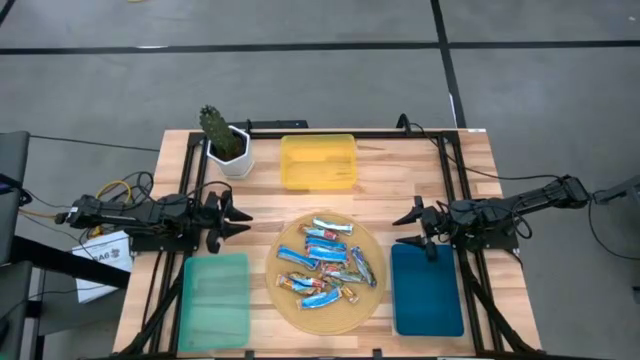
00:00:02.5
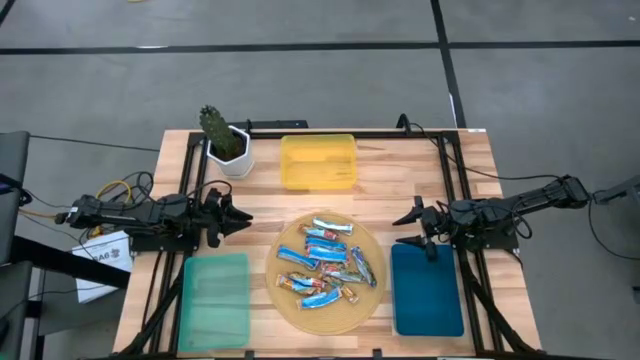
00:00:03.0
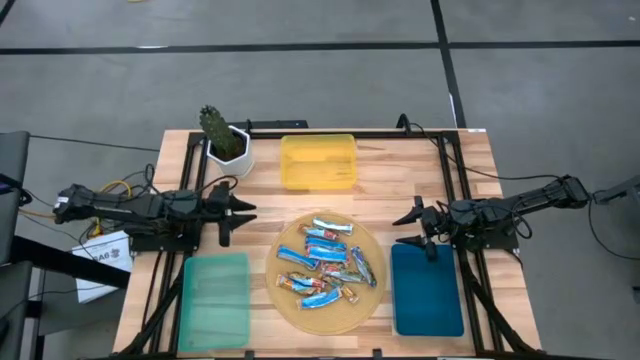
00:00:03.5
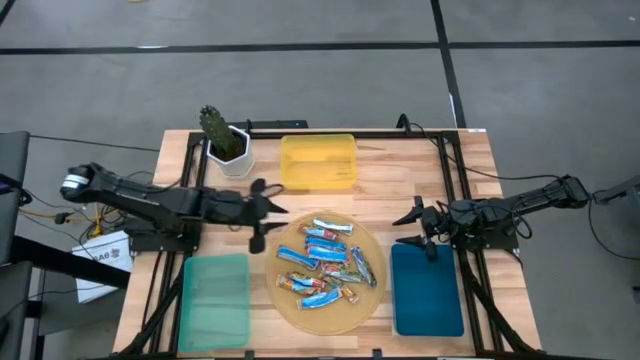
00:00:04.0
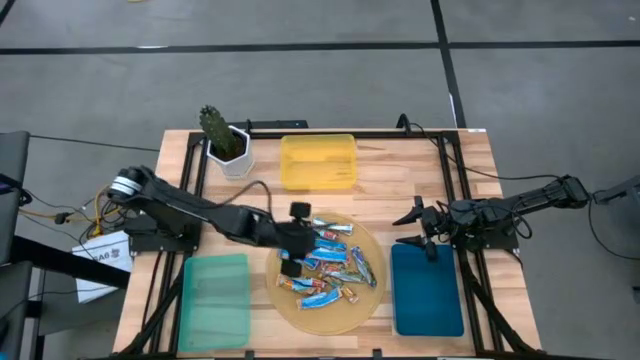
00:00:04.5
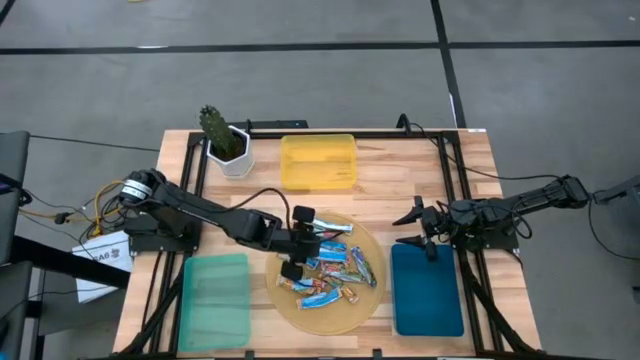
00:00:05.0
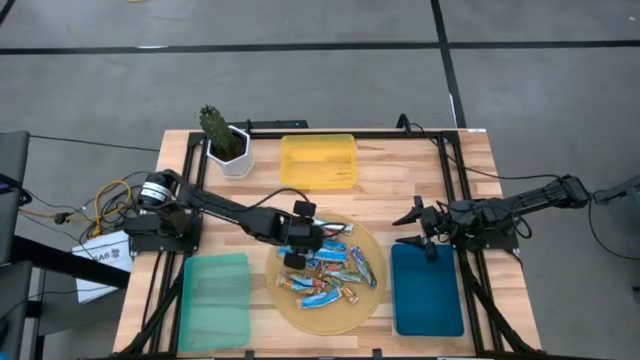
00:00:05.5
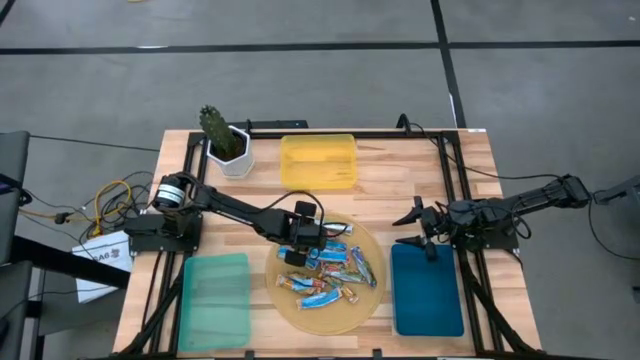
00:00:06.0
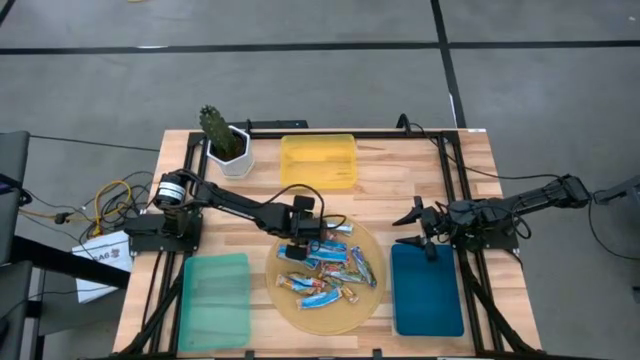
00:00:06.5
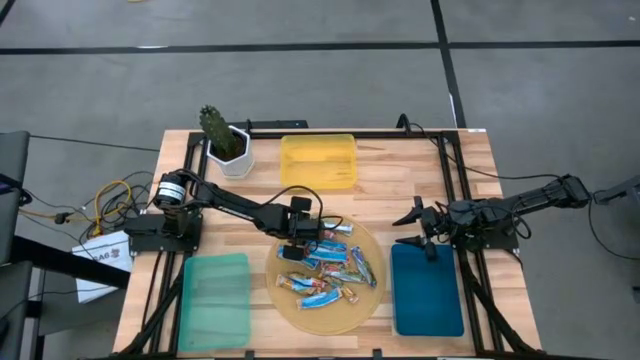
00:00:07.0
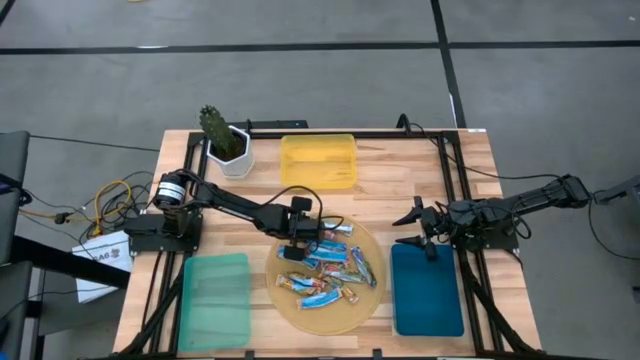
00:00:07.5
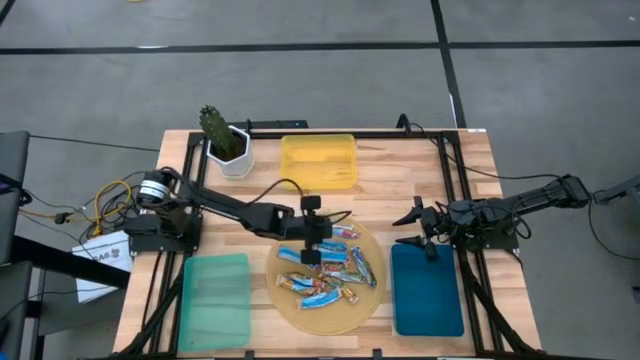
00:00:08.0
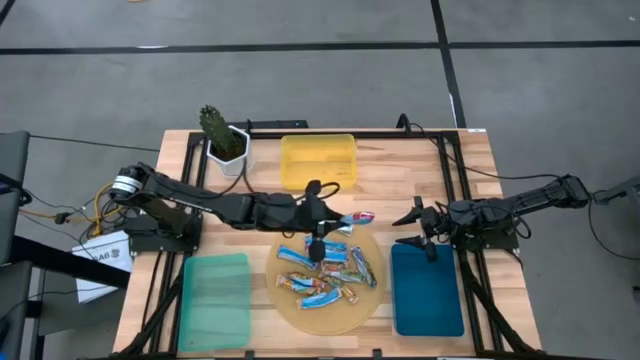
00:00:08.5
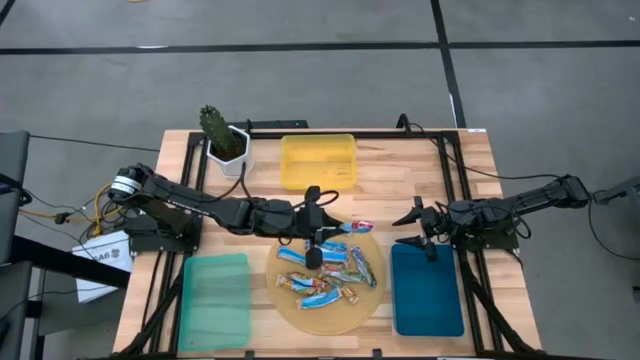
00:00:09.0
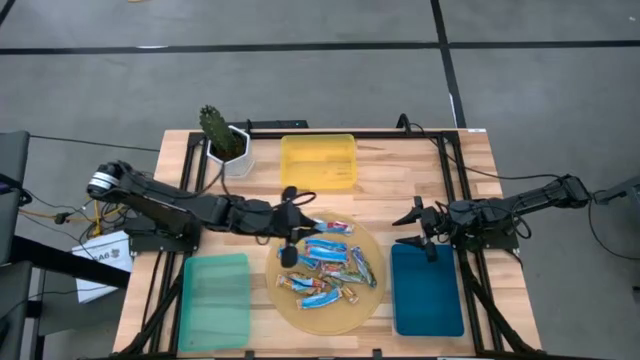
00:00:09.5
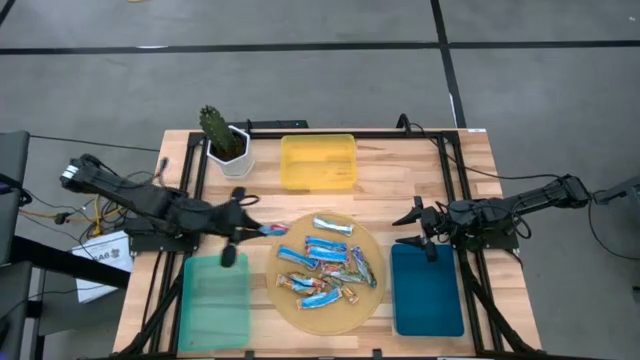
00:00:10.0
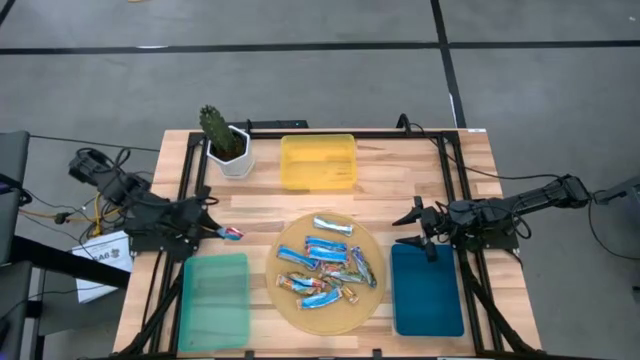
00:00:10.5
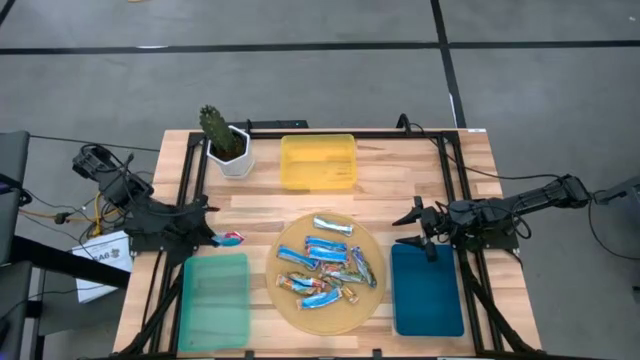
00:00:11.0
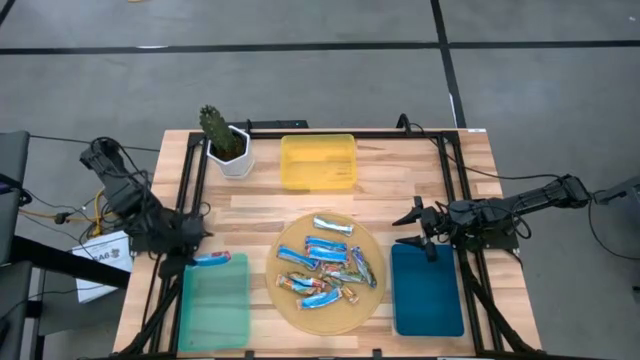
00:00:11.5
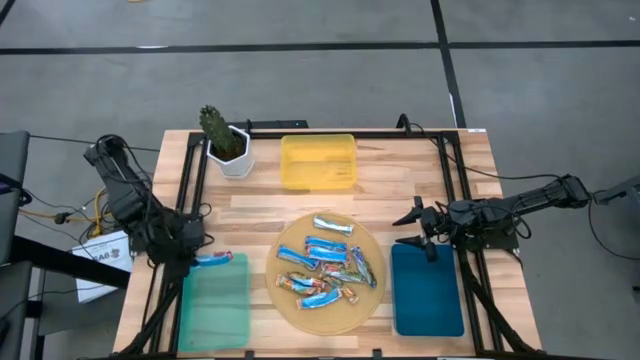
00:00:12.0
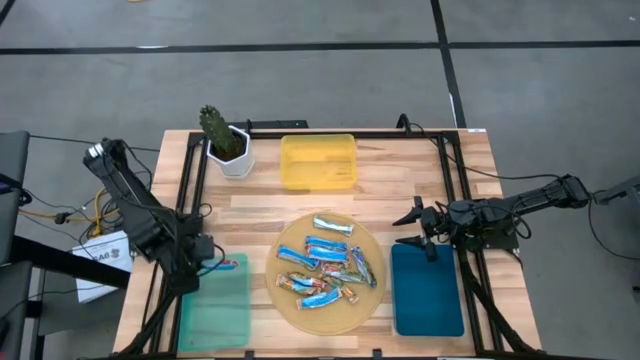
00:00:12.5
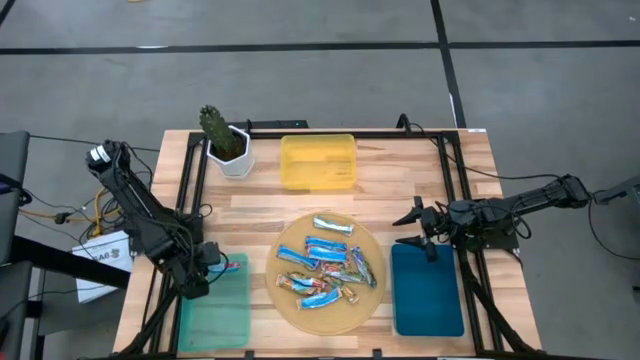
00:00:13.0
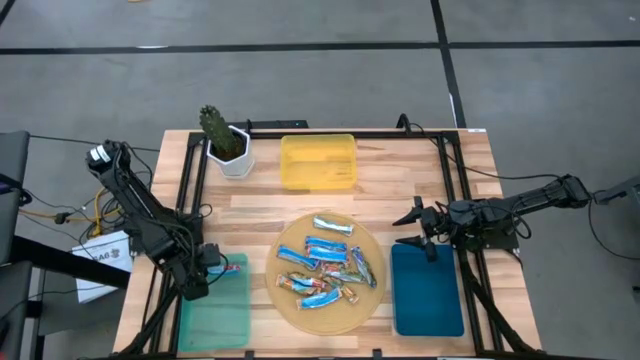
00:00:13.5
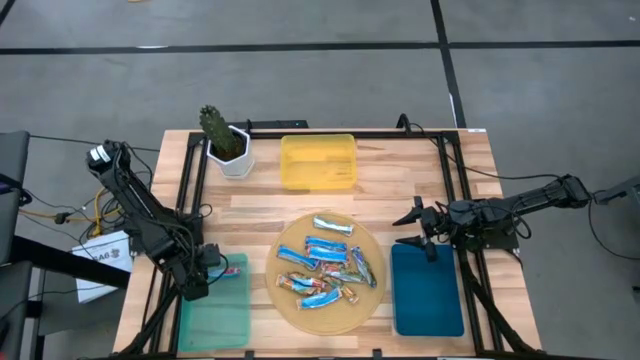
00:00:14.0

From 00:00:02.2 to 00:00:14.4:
Task: Pick and place Granola Bars by type
Put the red granola bar into the light blue bin

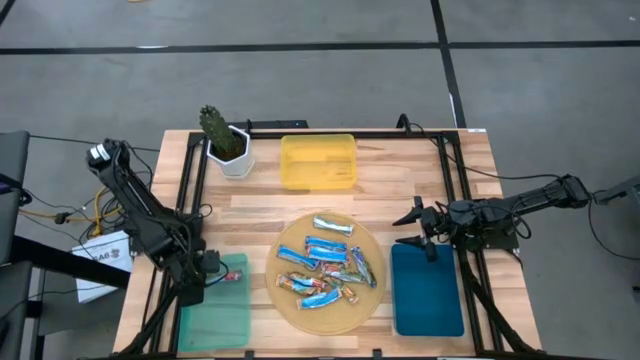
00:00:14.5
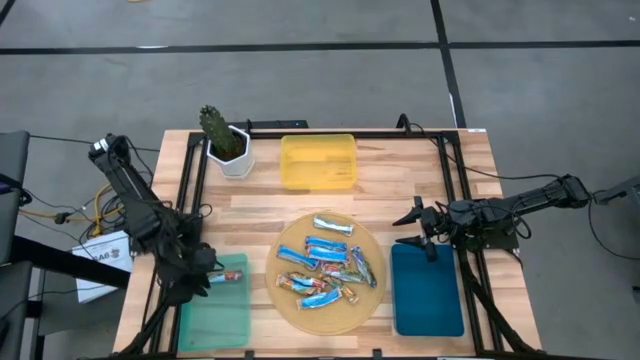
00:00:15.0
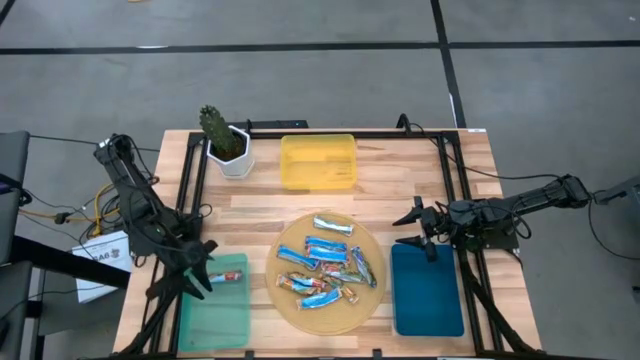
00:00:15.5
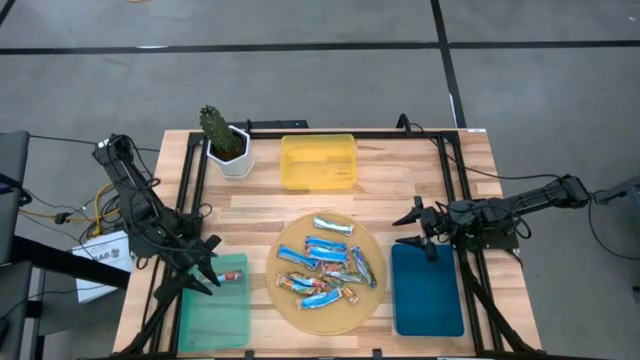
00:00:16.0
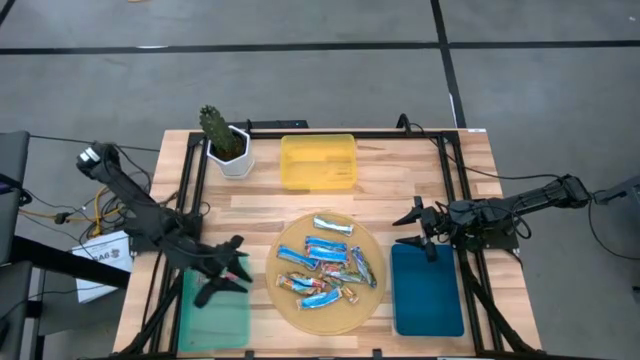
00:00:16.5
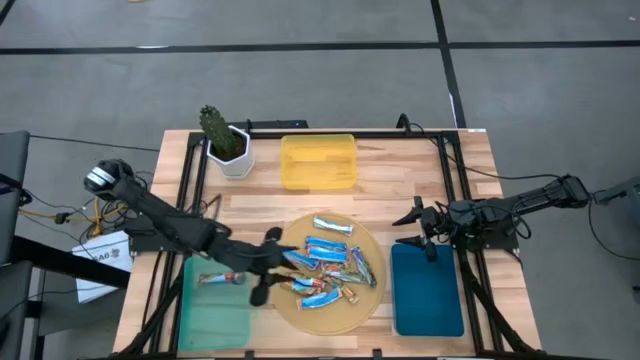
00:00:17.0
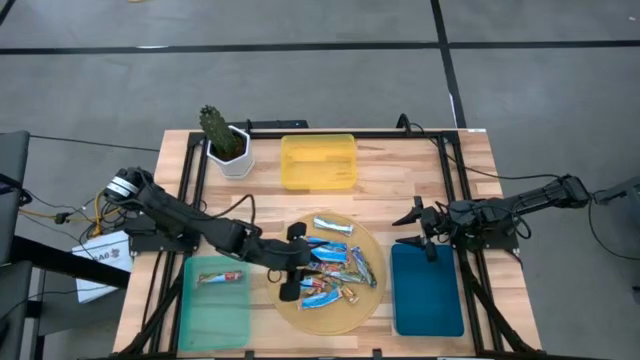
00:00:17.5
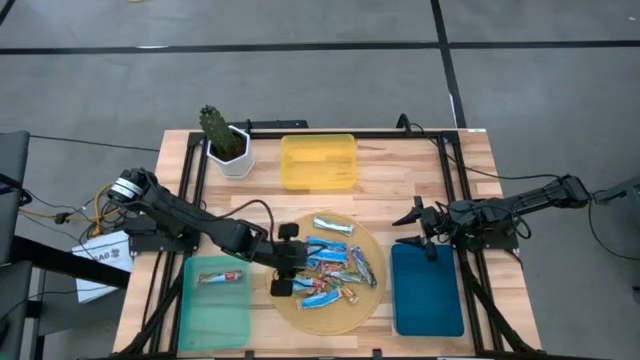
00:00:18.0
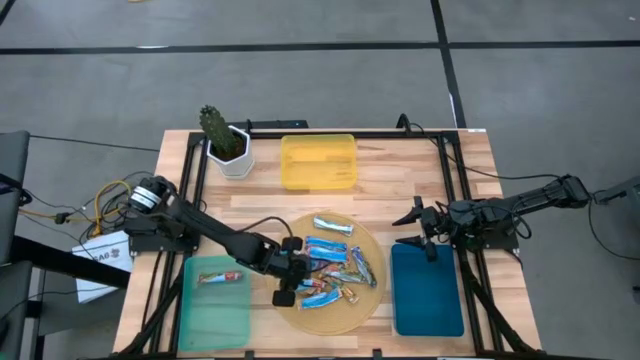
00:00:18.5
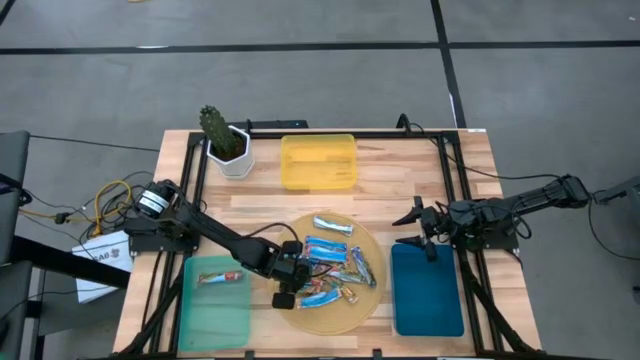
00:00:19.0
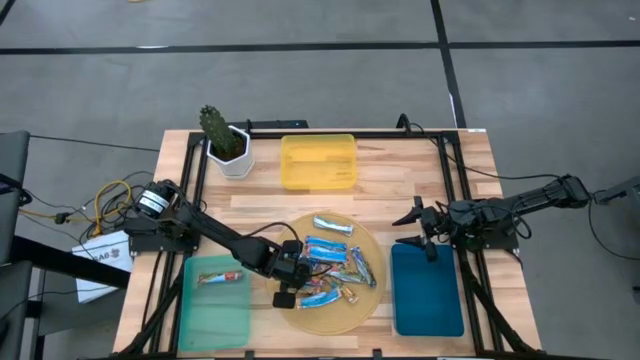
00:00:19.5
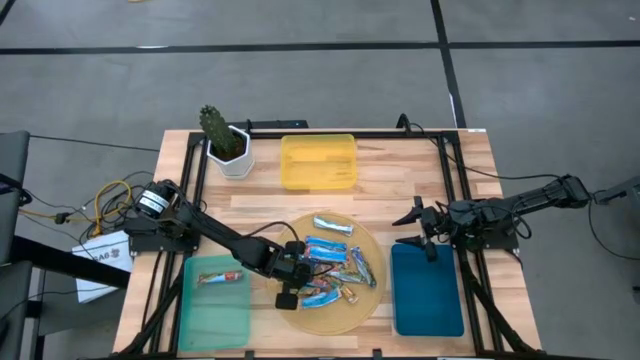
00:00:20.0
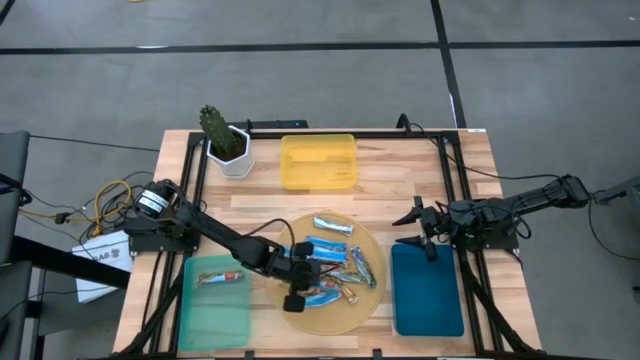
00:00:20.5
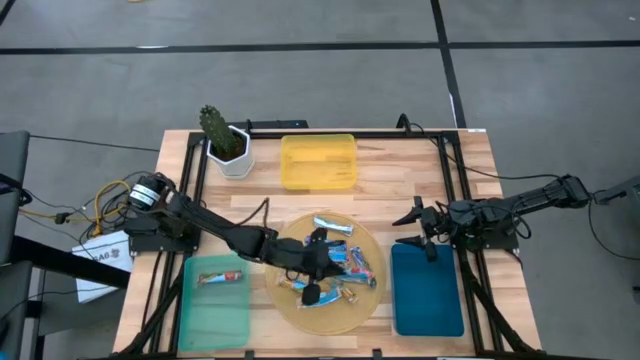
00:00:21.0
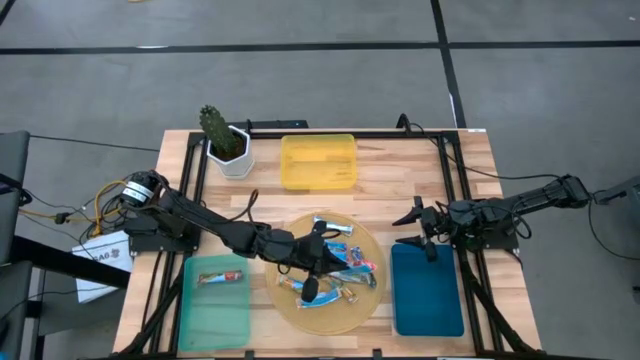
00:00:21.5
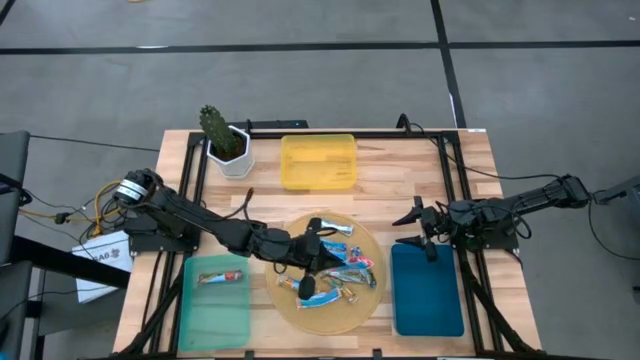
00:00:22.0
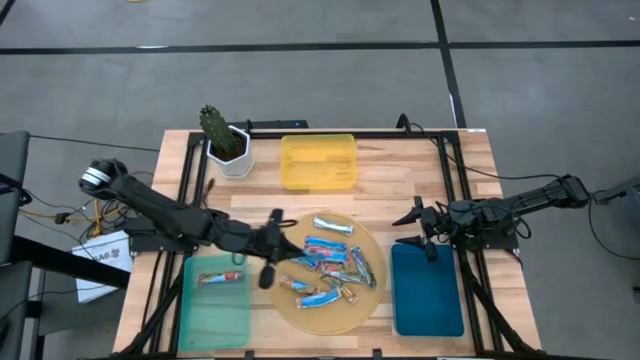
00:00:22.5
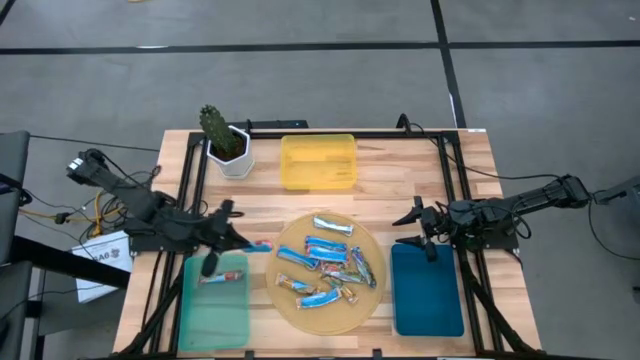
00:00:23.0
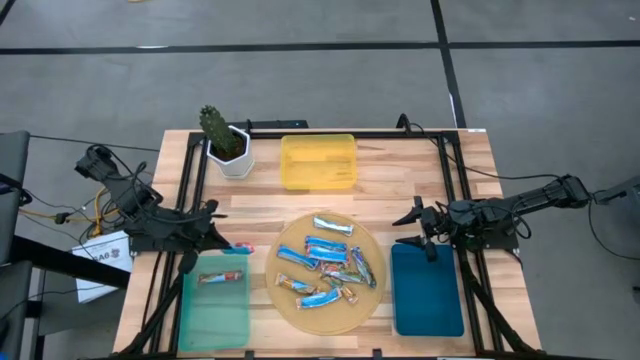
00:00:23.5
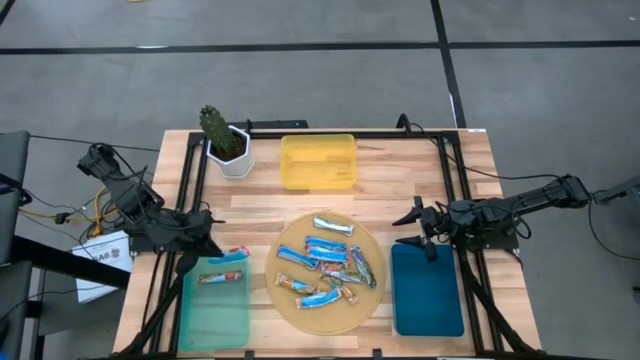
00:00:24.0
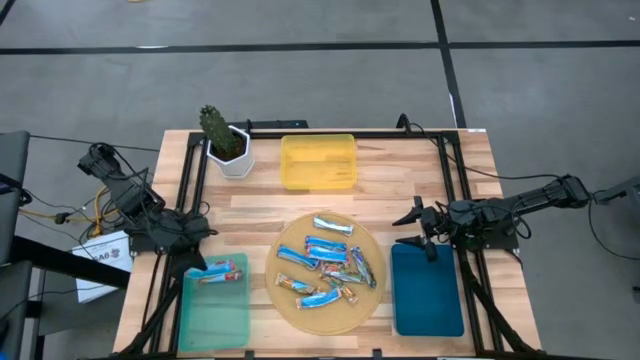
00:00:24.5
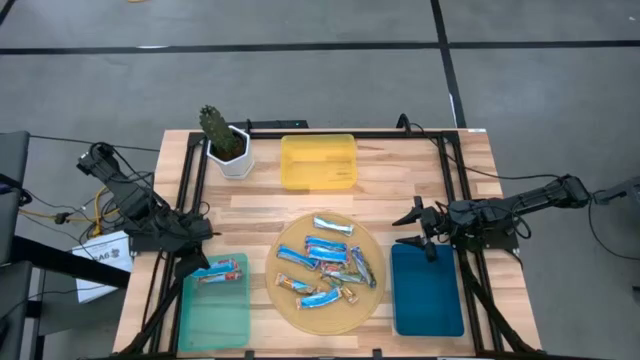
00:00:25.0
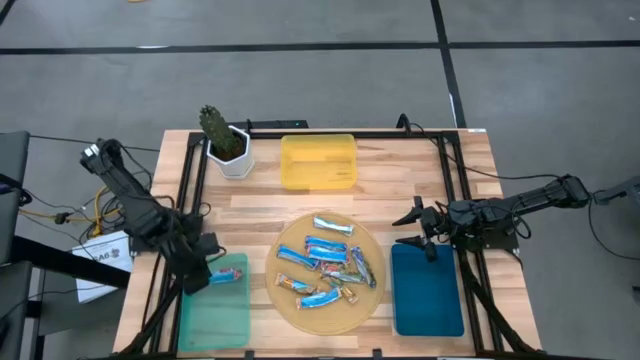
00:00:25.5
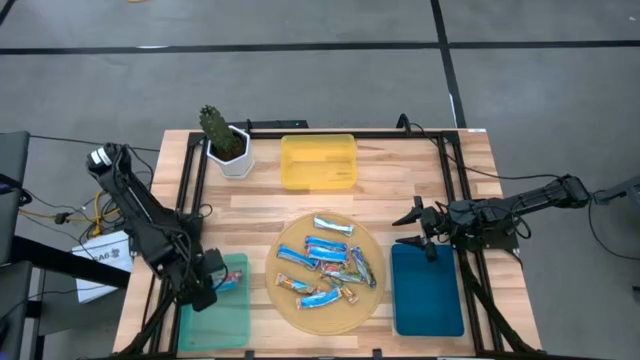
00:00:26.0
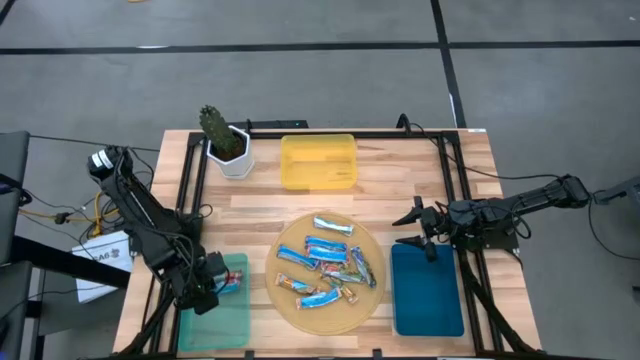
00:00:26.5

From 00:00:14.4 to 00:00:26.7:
Put the red granola bar into the light blue bin
